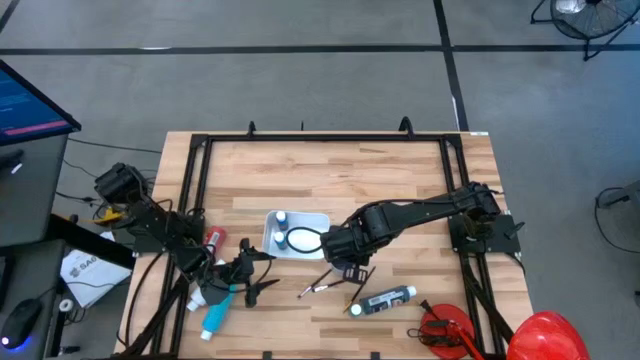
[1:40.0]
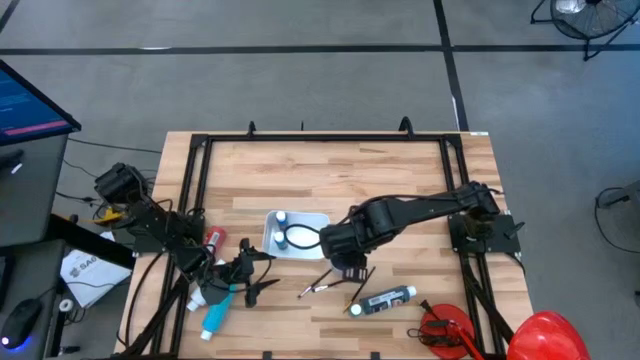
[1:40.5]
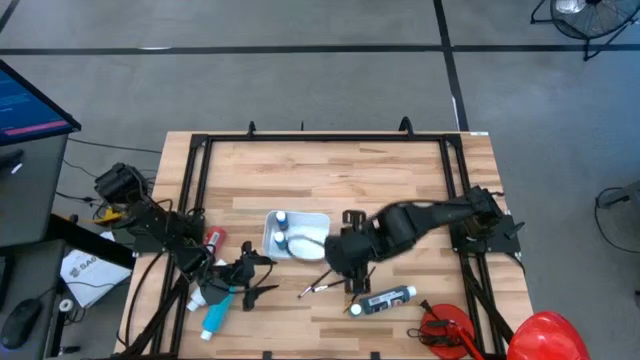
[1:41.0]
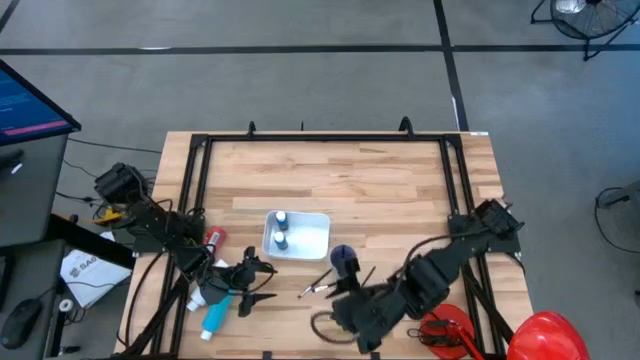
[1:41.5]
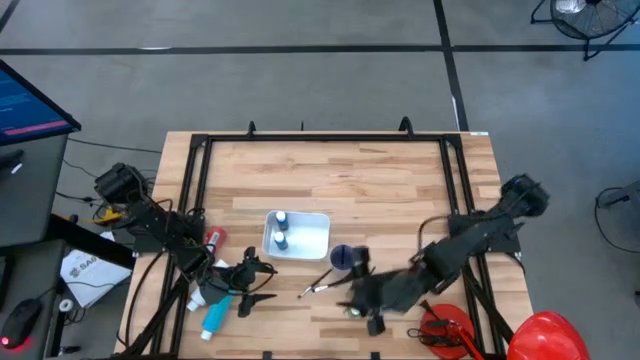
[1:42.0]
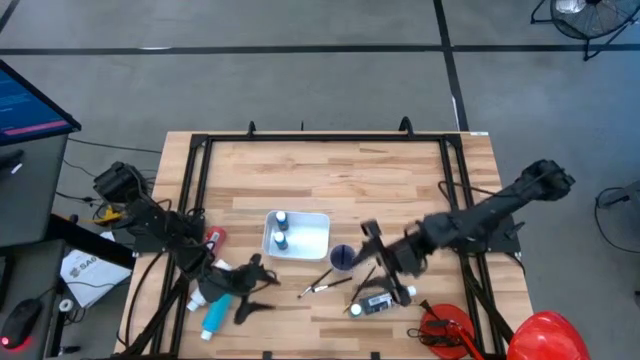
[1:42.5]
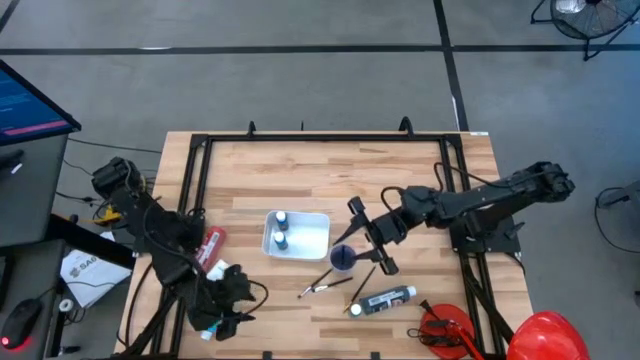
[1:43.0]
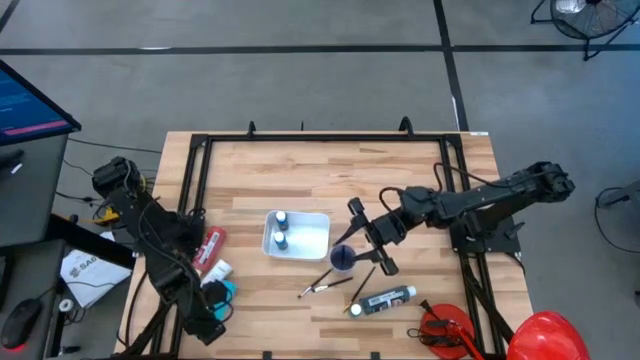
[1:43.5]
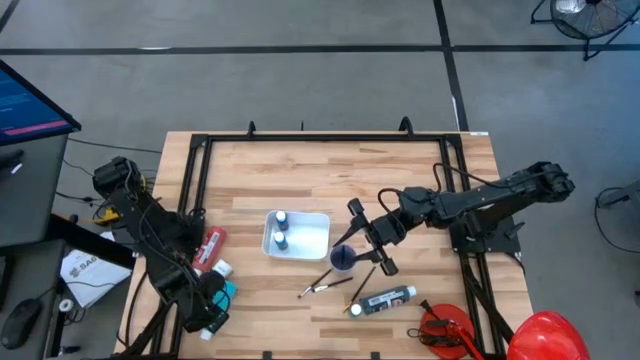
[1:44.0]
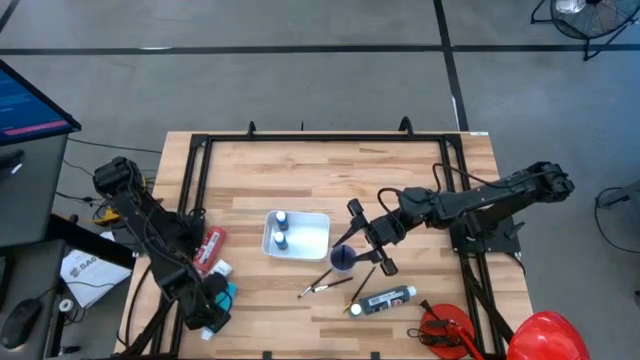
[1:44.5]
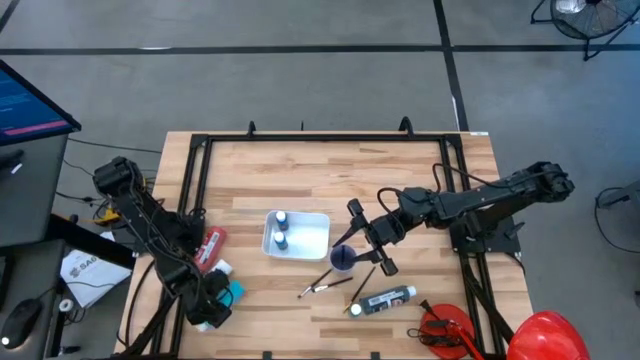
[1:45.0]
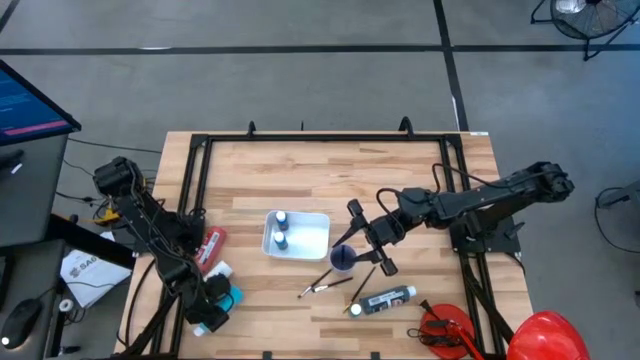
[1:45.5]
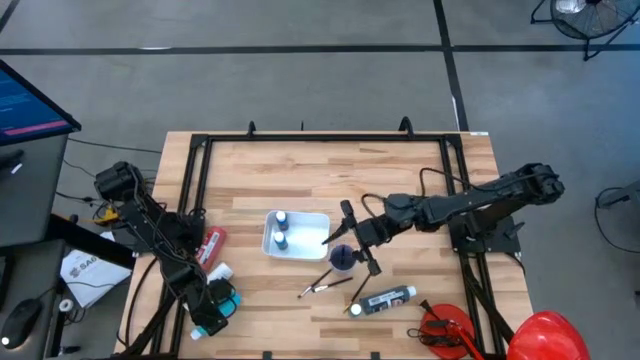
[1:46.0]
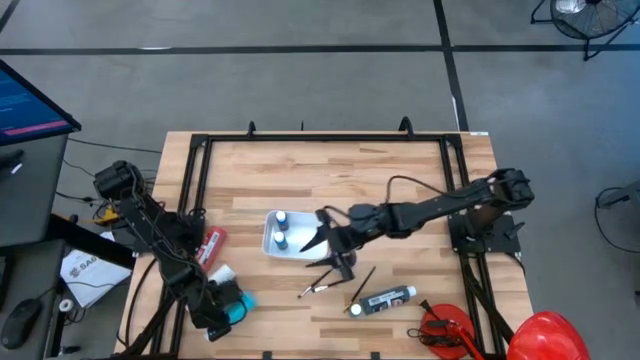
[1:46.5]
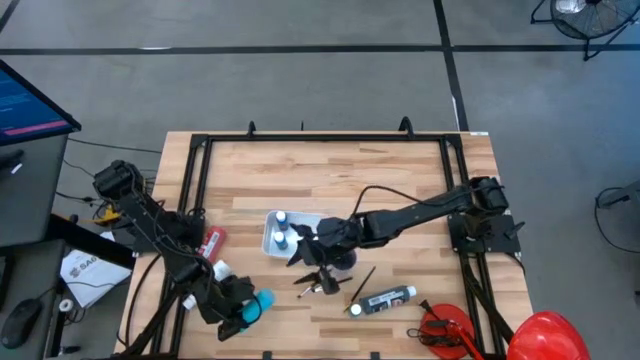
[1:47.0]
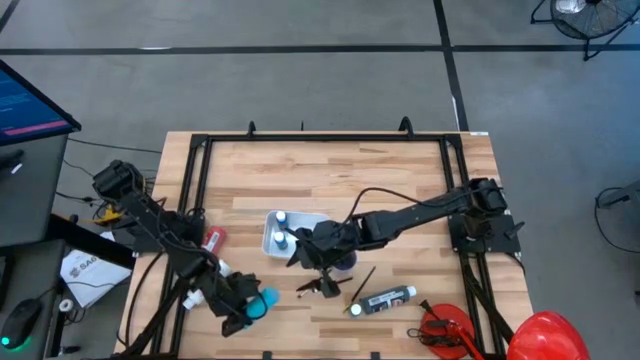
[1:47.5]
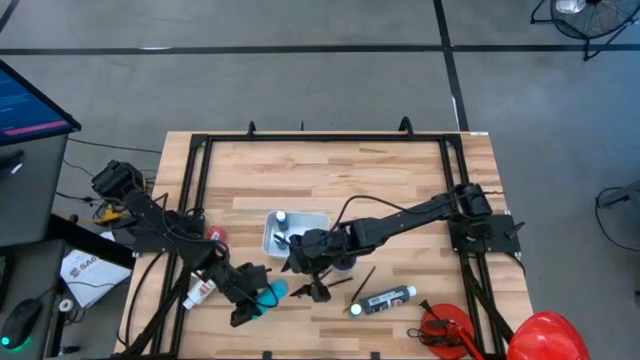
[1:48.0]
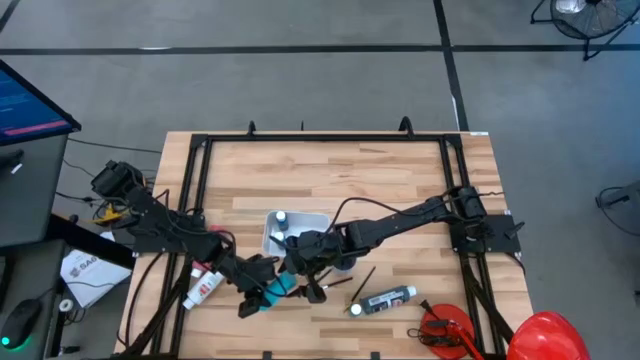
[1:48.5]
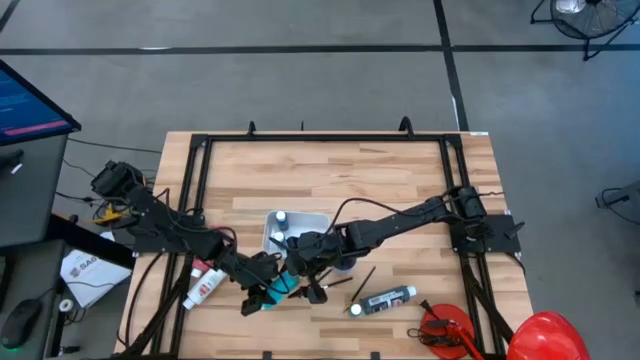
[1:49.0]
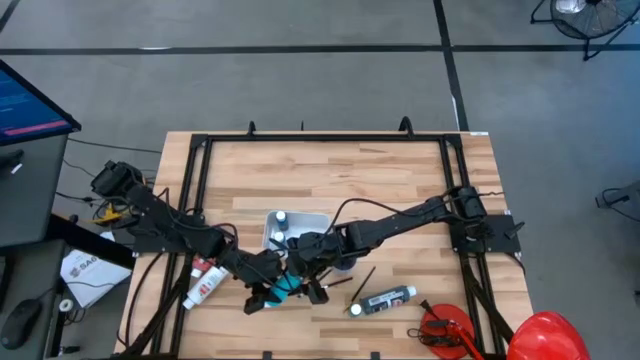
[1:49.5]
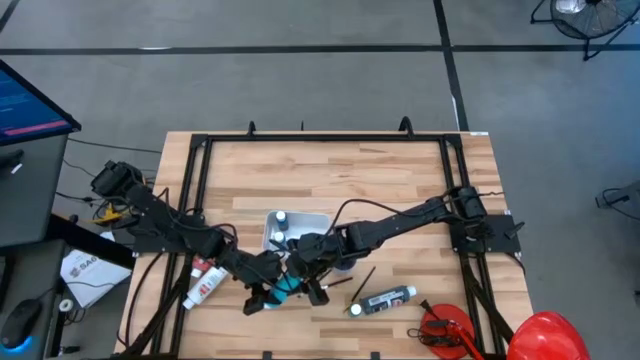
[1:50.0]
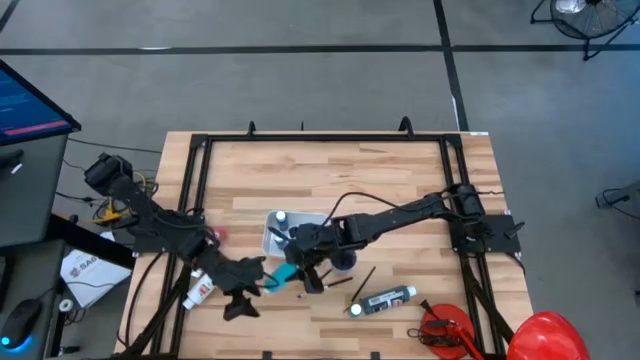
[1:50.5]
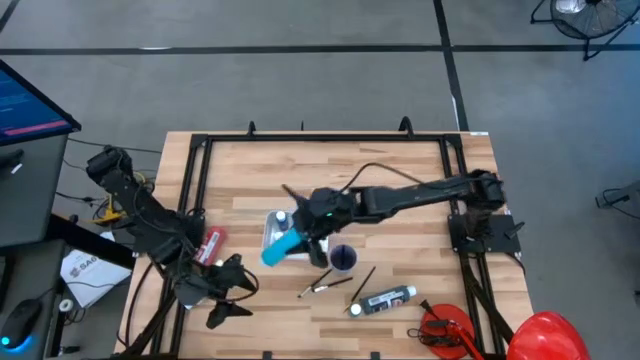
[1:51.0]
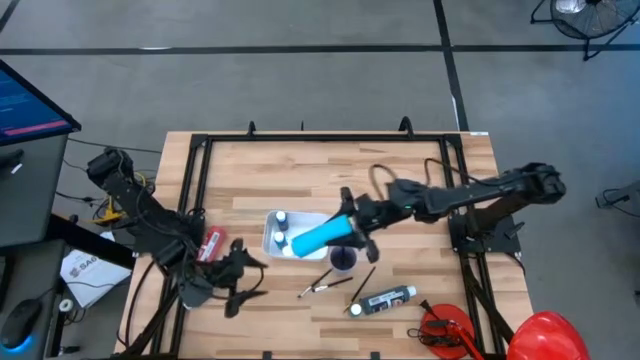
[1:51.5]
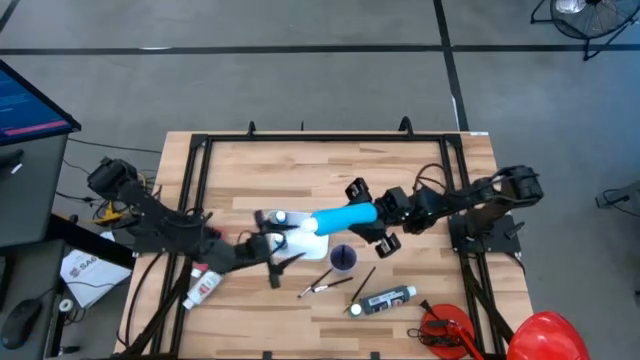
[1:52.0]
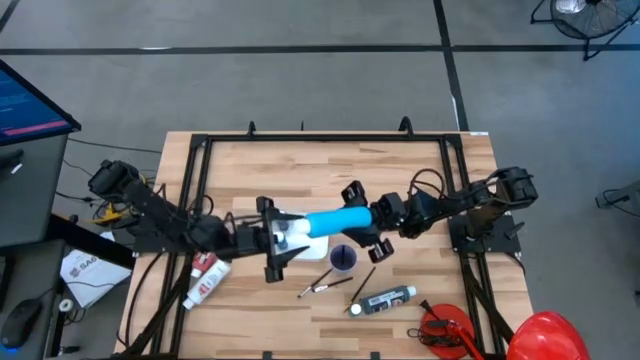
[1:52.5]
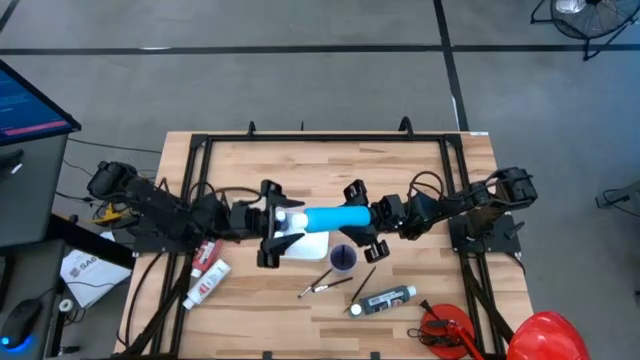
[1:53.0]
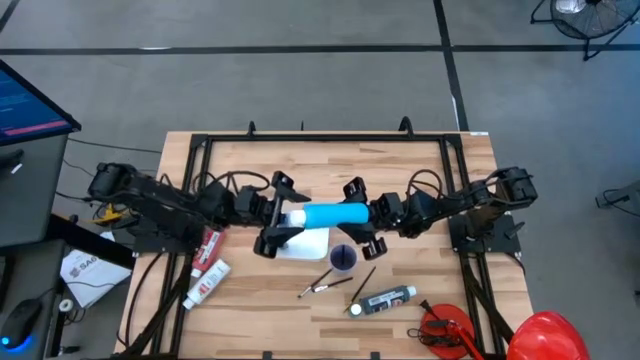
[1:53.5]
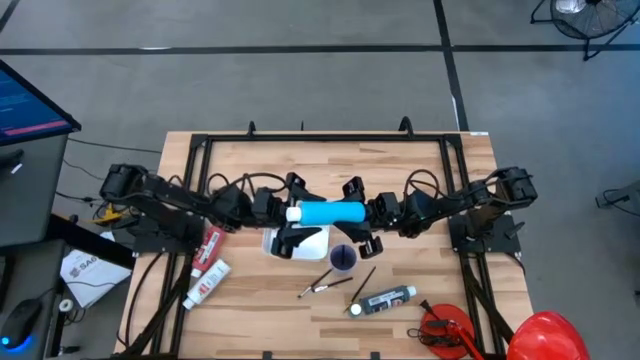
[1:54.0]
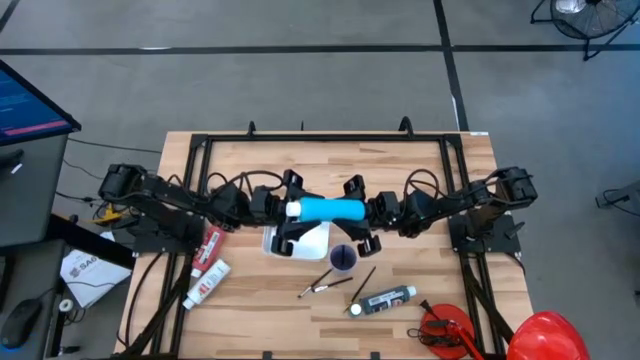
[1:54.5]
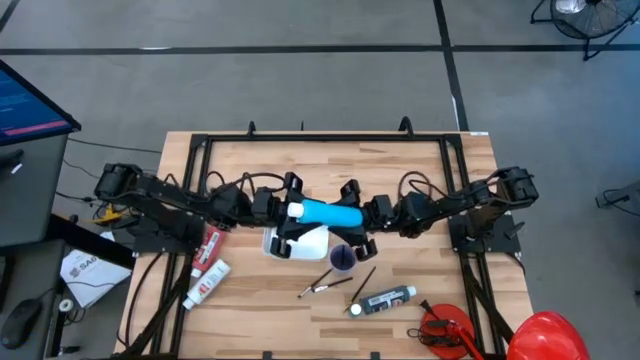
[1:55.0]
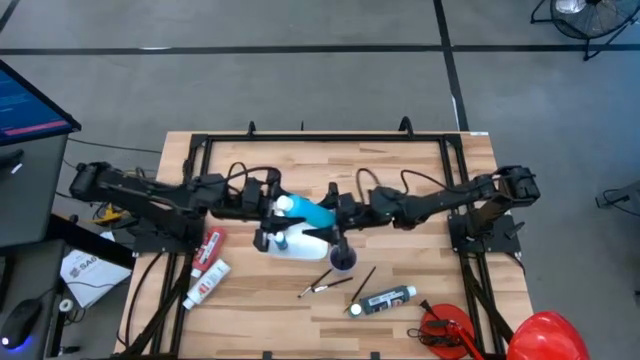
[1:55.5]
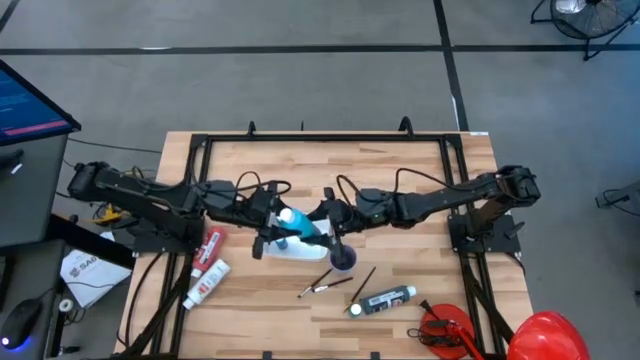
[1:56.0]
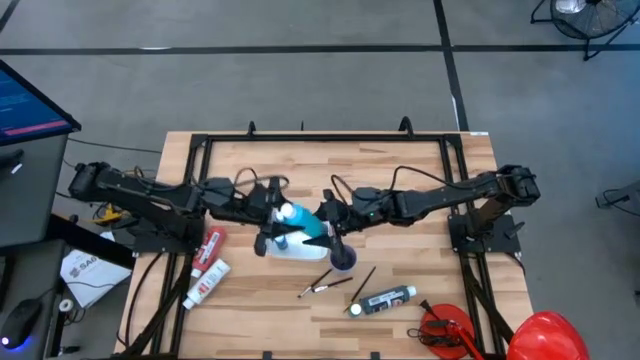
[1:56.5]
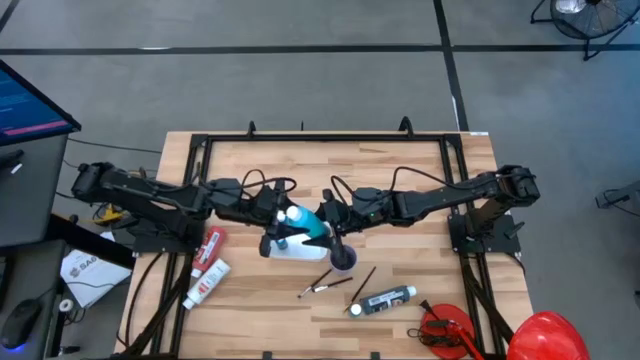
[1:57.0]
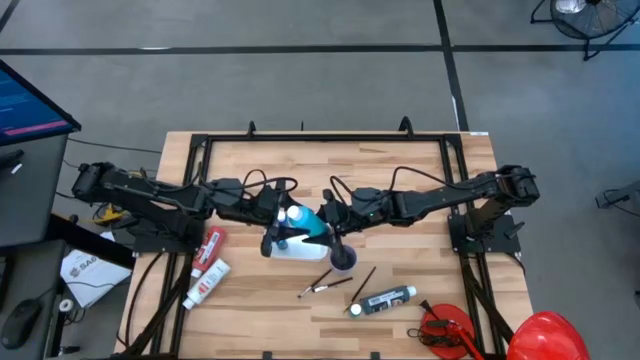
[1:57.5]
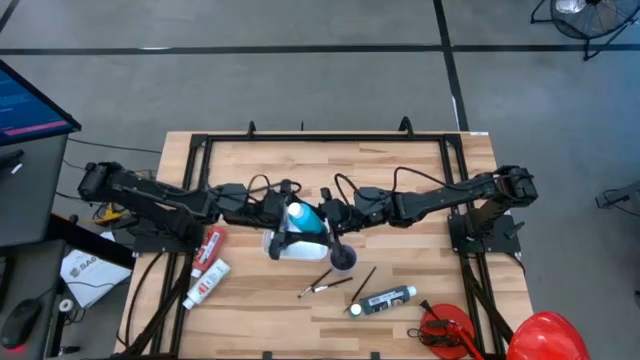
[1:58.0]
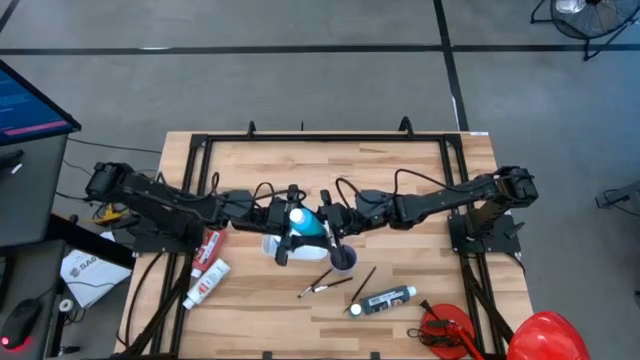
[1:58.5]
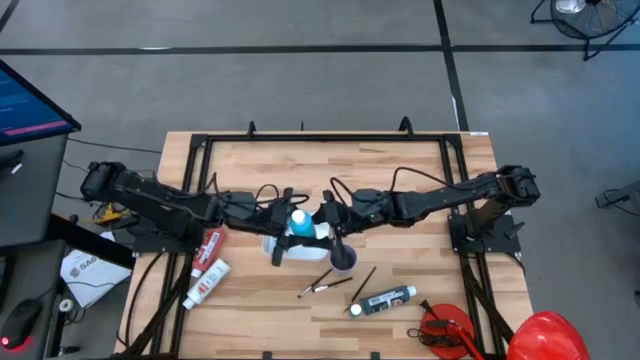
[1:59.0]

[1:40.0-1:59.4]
Task: Pick & Place Paint Supplies
Put the light blue paint bottle into the white bin

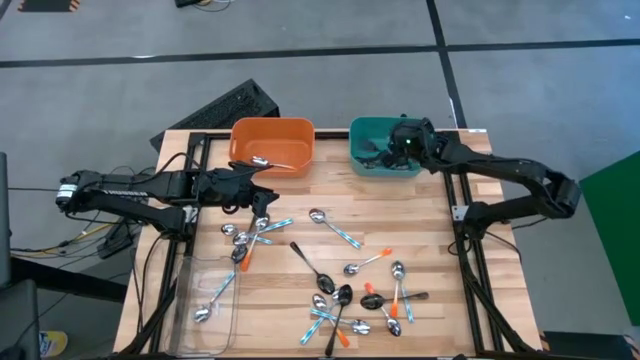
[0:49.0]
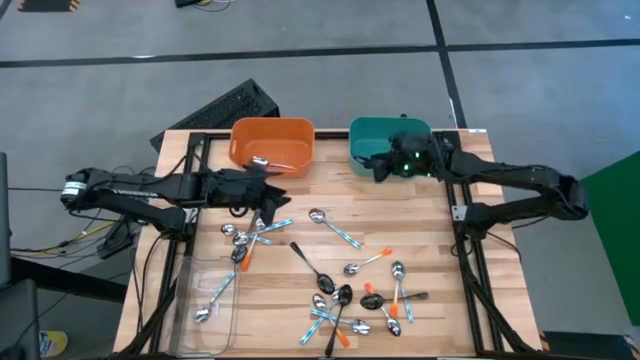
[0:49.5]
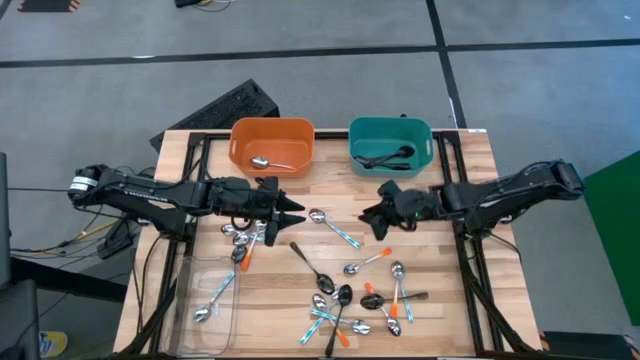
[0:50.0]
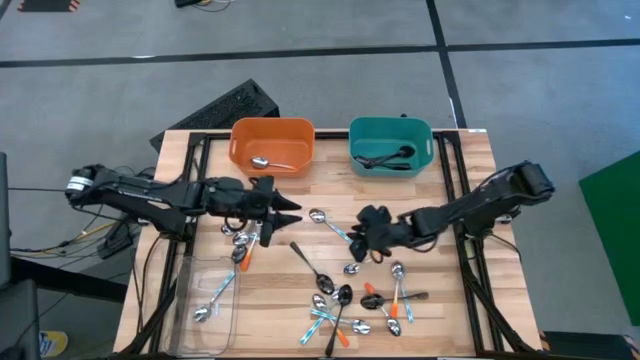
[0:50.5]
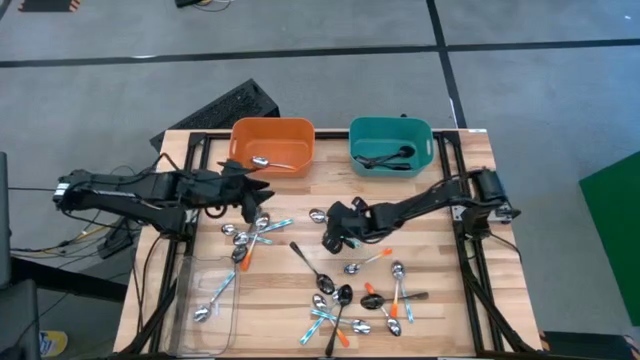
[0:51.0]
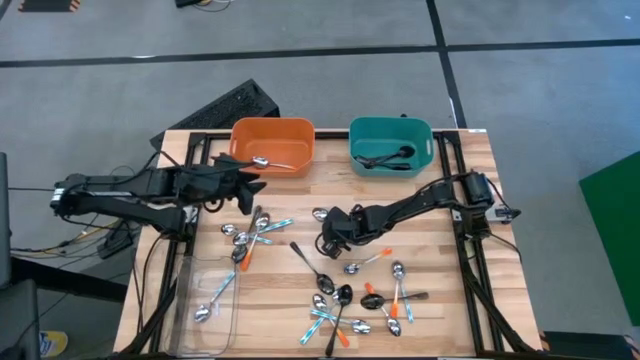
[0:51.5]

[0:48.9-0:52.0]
Task: Sort silverware by color (type)
Put the green spoon into the transparent bin
